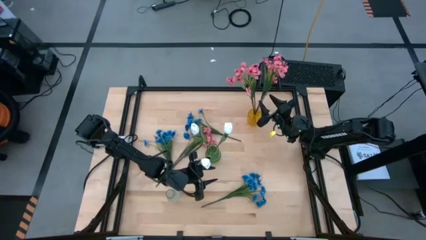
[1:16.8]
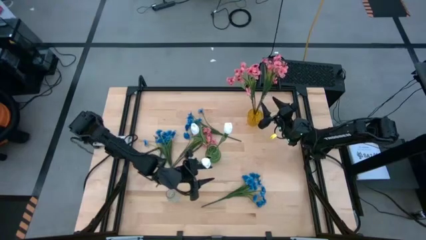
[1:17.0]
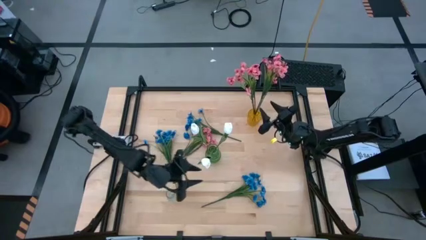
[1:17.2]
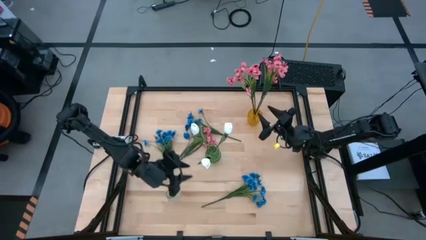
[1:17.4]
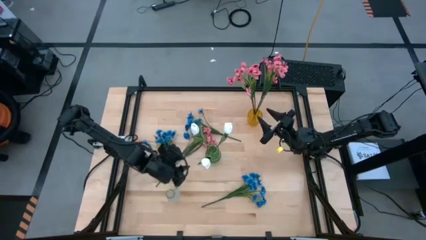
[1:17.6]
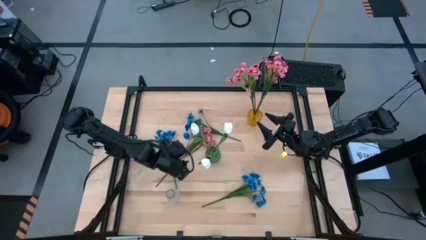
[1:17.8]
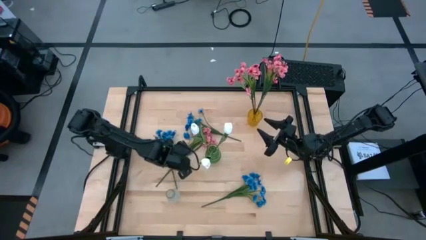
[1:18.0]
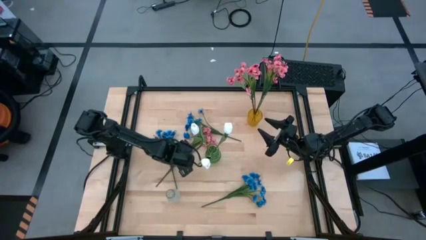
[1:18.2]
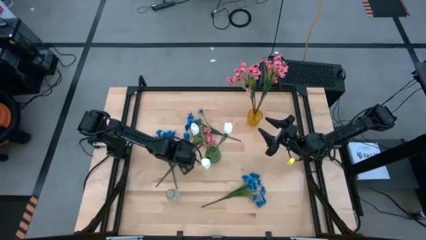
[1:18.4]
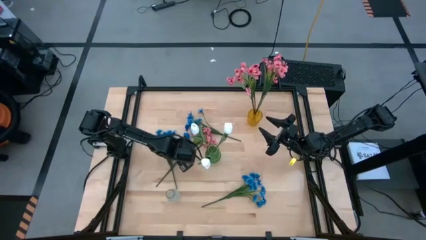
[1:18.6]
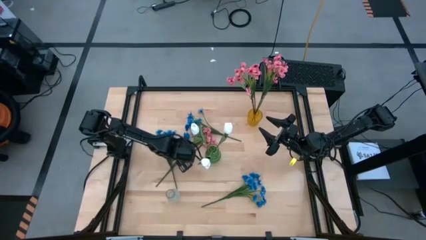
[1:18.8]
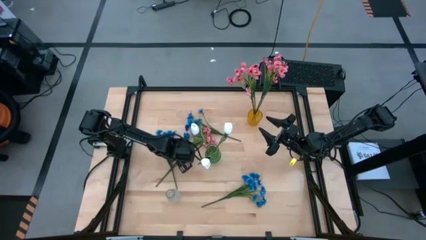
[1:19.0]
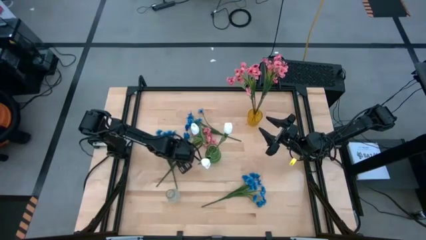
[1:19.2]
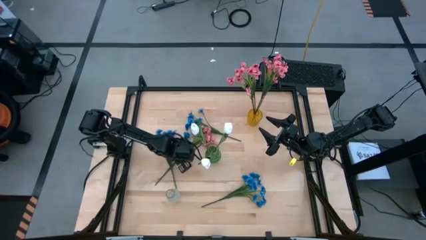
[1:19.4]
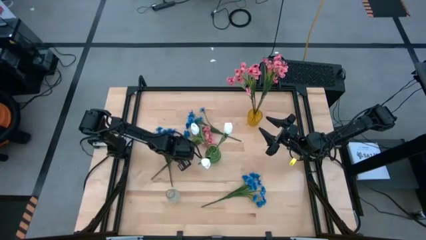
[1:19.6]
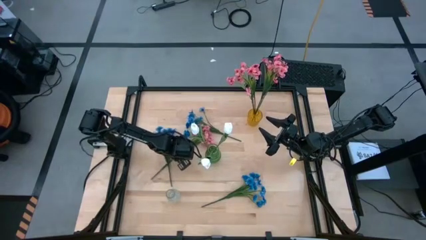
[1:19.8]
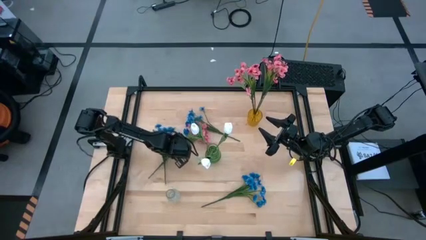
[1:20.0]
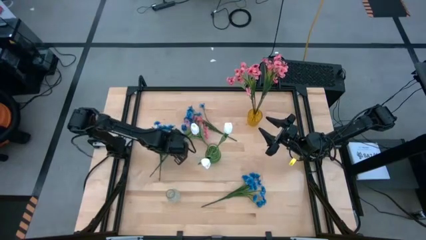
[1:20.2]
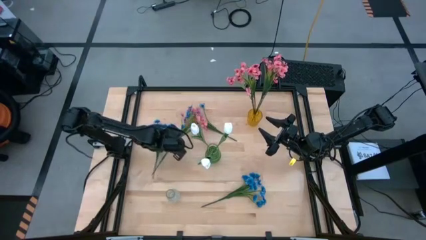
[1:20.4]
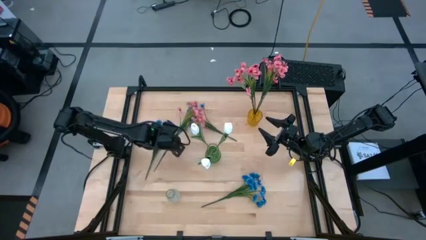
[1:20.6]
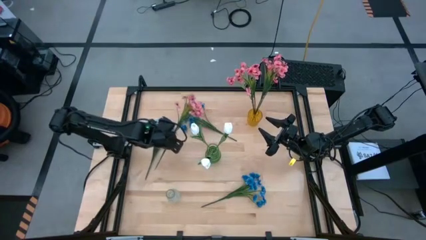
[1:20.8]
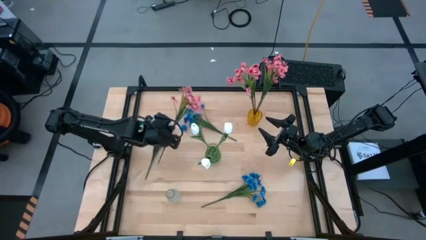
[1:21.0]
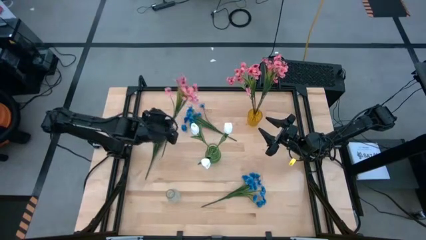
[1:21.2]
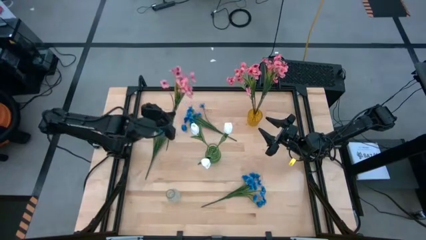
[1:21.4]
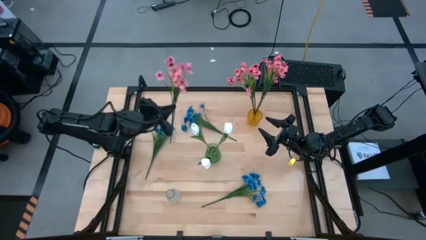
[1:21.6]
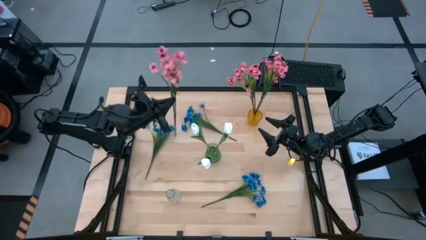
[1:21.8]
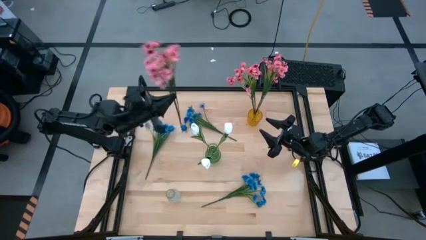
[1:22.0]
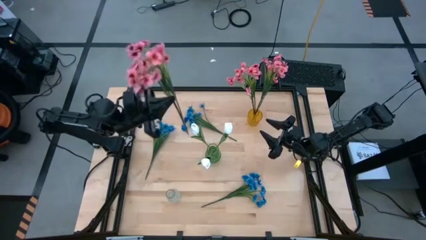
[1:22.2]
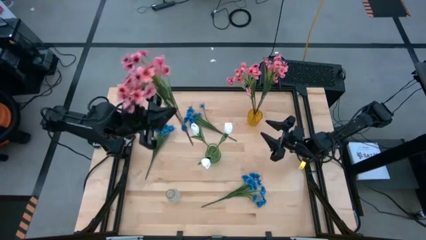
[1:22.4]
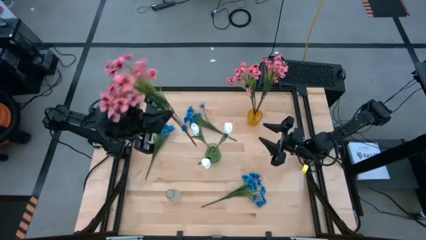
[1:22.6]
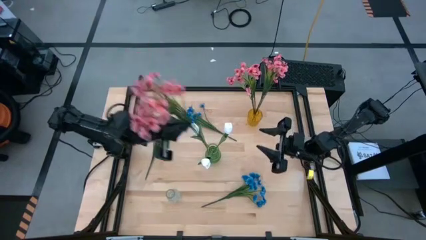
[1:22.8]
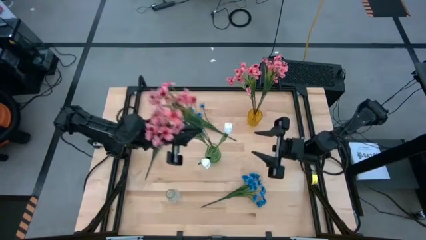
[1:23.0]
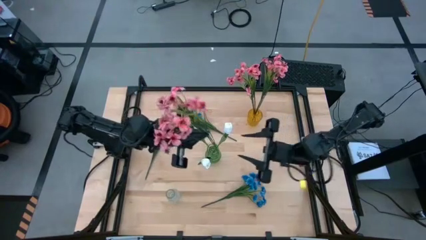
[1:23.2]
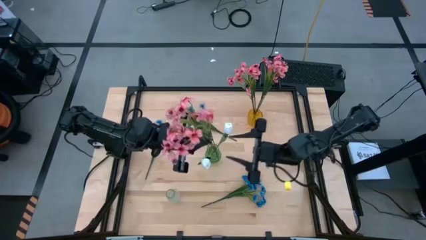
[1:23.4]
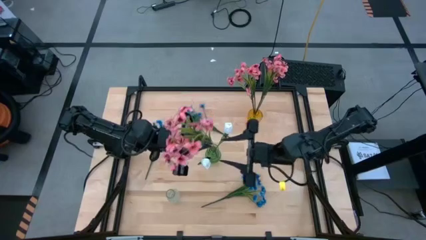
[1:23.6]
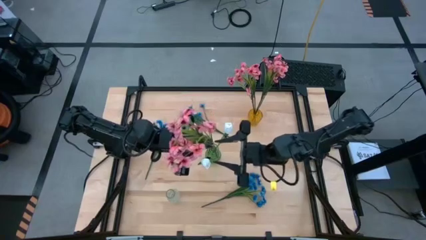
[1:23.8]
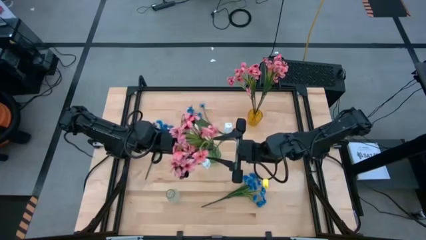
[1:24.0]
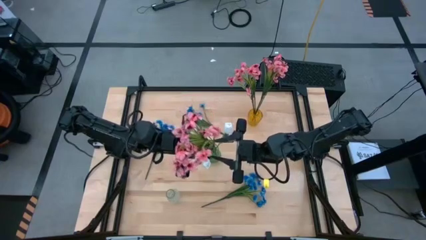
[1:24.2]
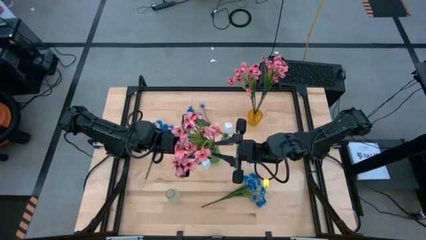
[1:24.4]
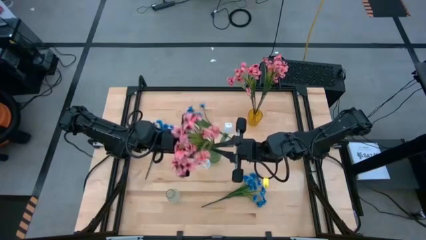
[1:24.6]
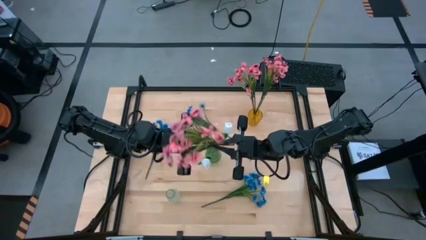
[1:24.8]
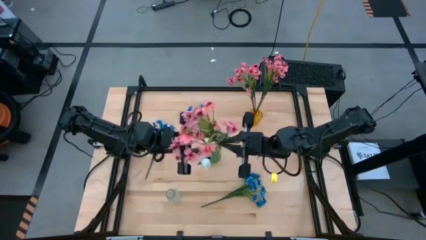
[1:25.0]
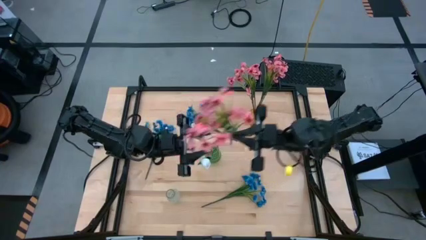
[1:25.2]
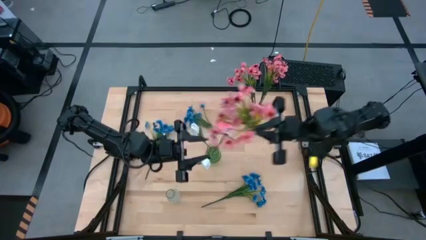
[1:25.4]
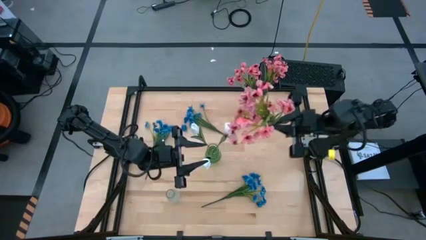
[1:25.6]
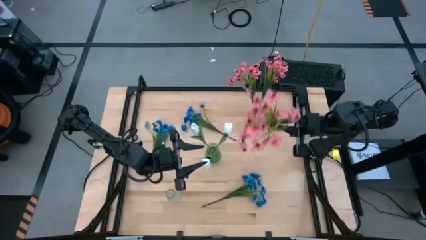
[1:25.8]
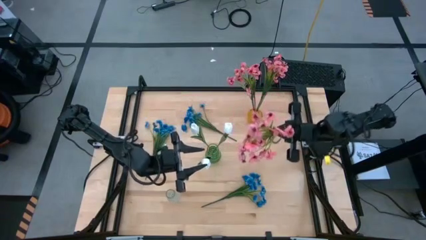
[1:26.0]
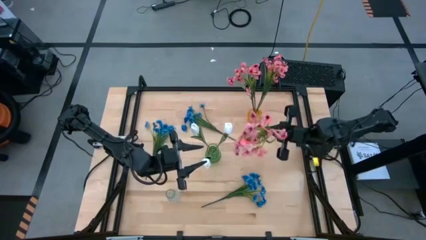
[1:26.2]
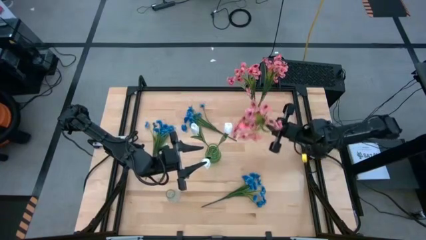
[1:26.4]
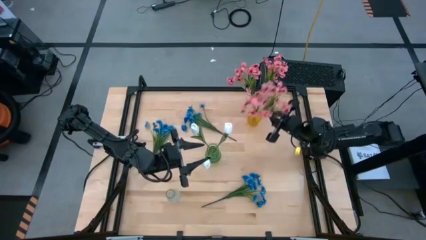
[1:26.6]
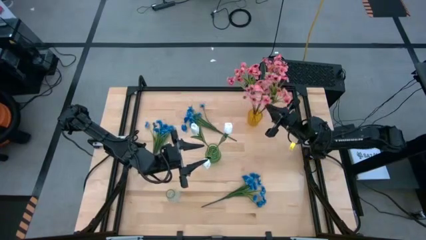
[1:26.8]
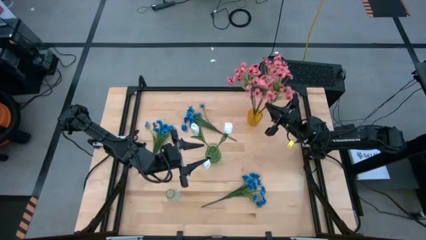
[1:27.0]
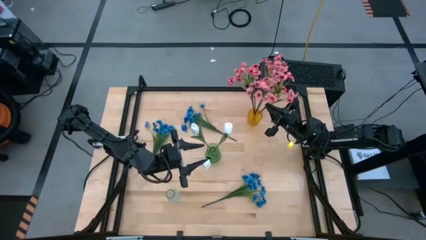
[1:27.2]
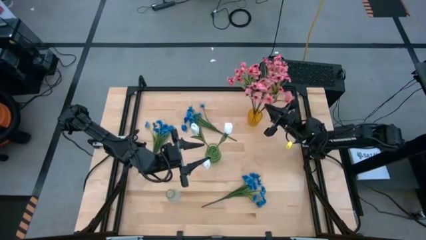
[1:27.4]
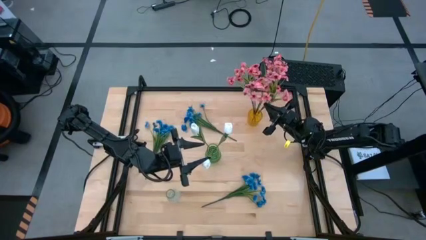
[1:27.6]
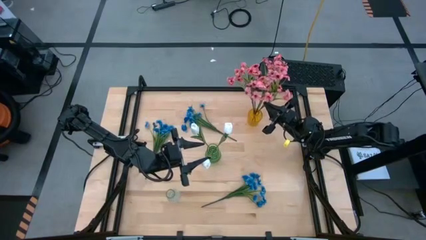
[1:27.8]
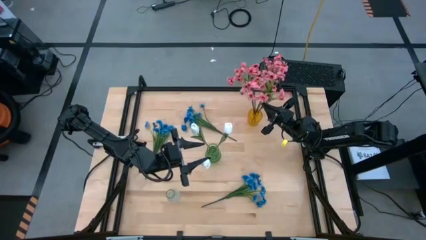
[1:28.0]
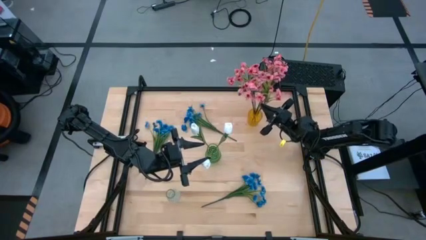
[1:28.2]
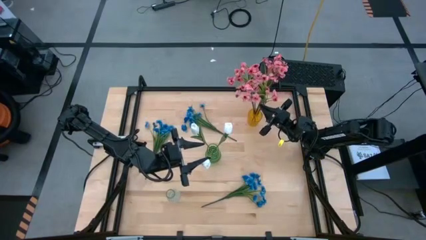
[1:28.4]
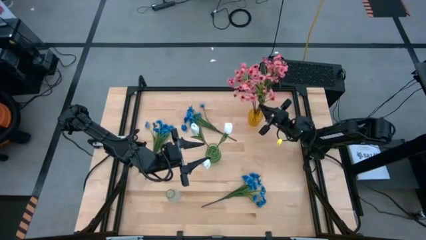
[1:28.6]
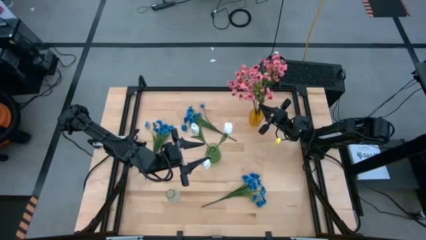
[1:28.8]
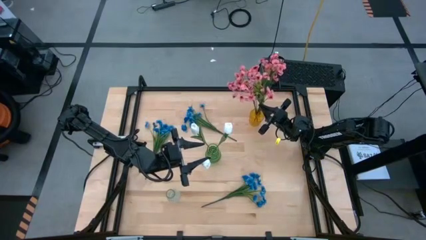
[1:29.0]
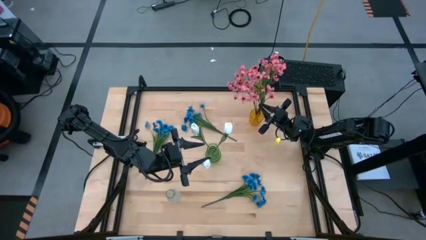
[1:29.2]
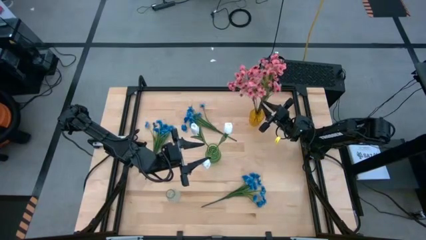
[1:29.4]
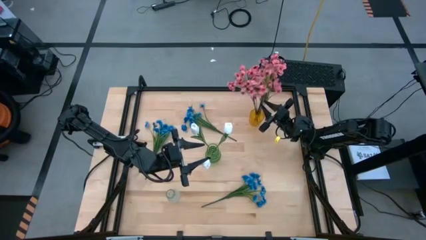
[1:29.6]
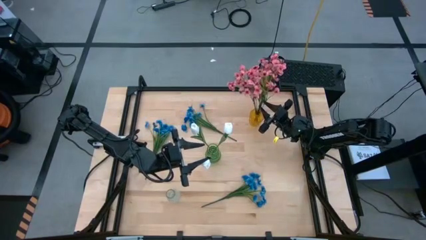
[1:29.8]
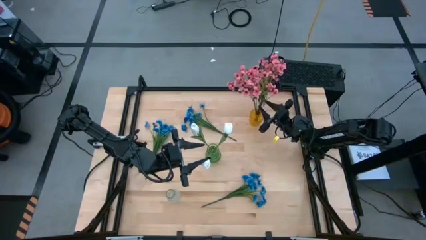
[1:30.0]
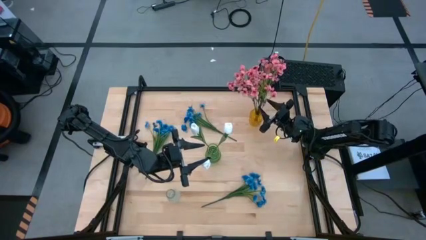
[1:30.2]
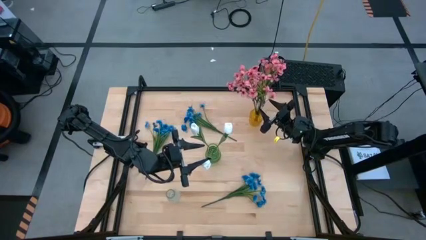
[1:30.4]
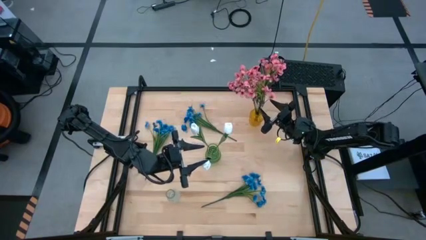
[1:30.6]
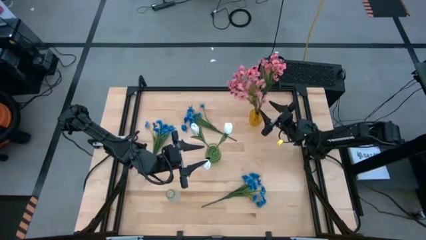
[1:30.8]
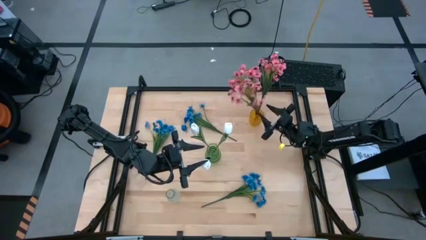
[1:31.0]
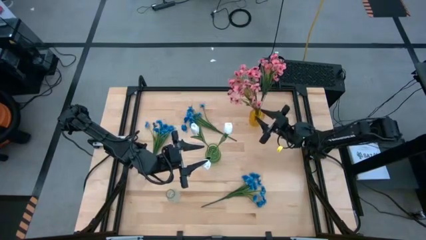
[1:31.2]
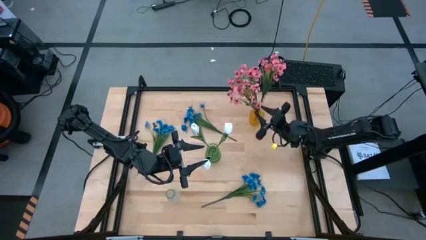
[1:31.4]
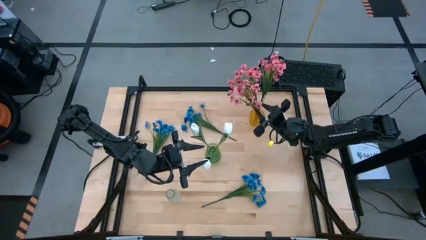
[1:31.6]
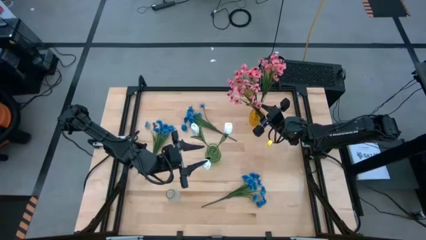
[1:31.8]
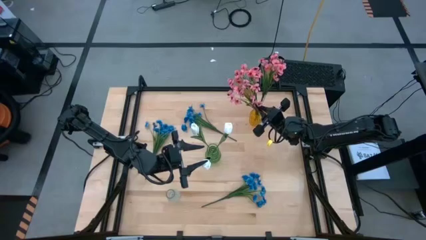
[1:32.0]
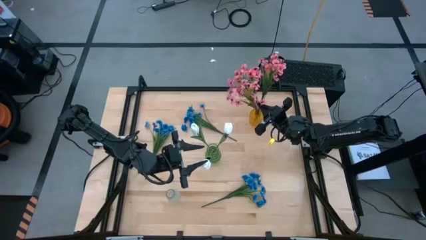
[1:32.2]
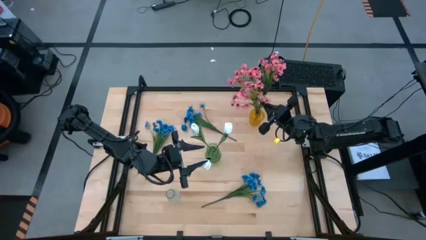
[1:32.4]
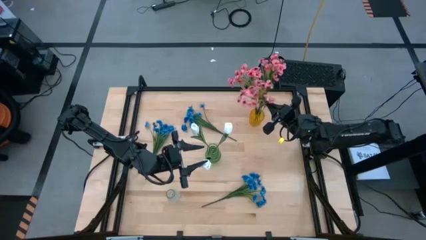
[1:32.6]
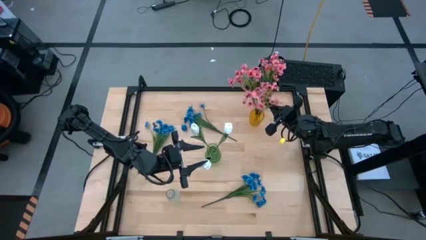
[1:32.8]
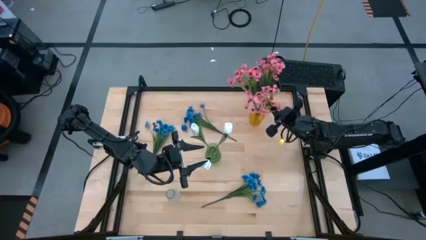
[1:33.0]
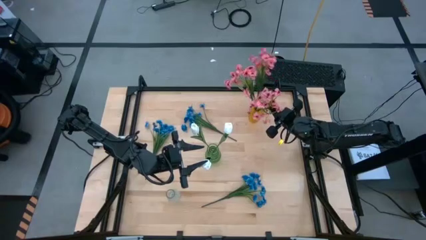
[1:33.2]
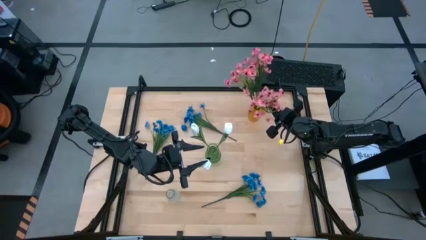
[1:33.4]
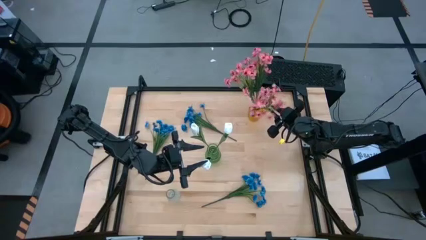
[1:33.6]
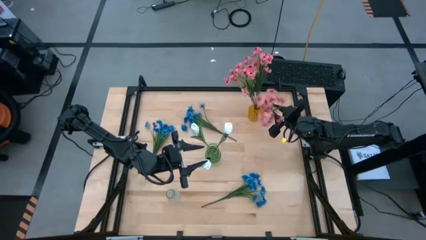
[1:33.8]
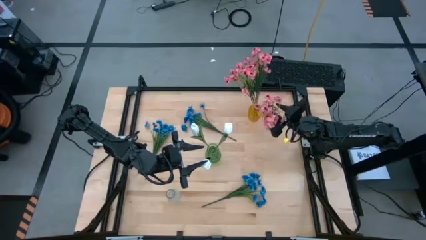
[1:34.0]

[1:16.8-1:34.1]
Task: Sort flowers into vase by color
Put the pink flowers into the yellow vase
